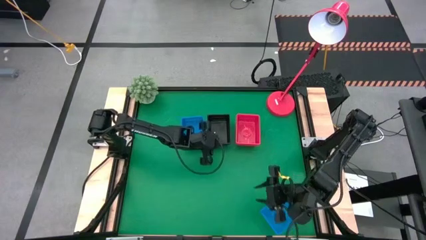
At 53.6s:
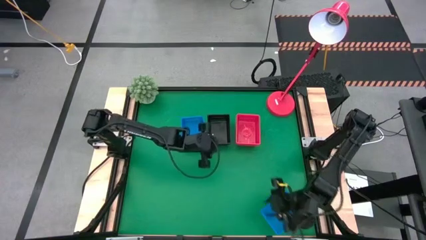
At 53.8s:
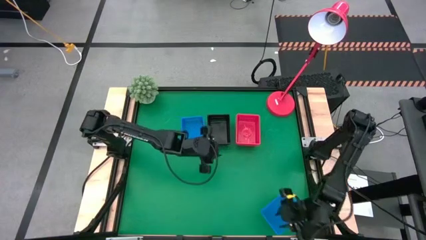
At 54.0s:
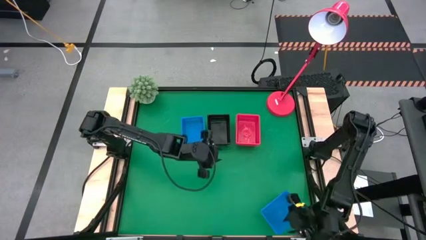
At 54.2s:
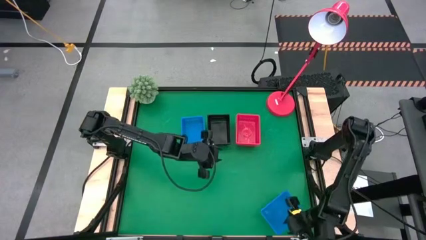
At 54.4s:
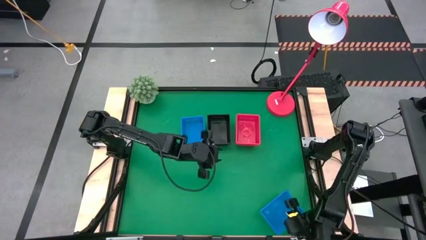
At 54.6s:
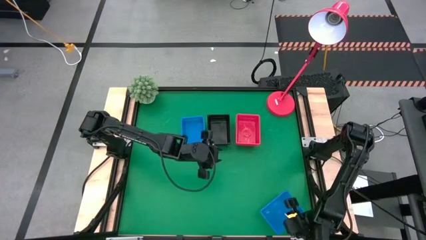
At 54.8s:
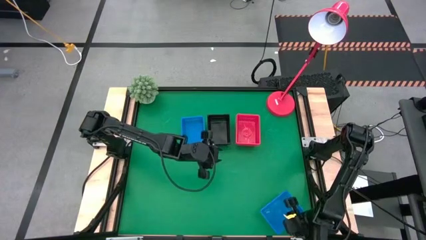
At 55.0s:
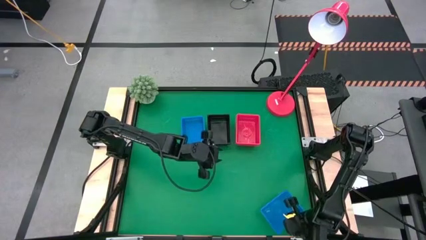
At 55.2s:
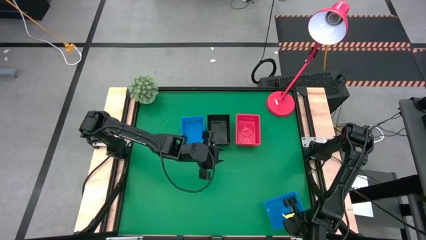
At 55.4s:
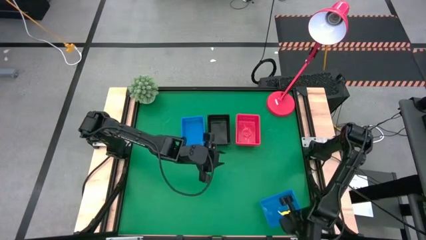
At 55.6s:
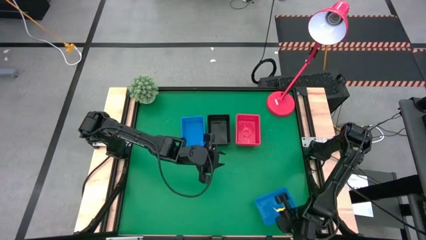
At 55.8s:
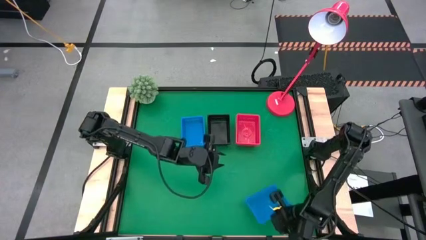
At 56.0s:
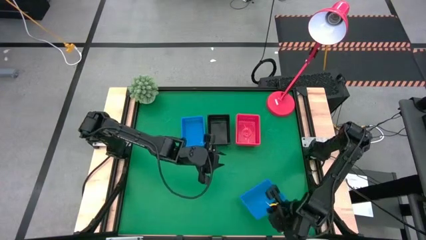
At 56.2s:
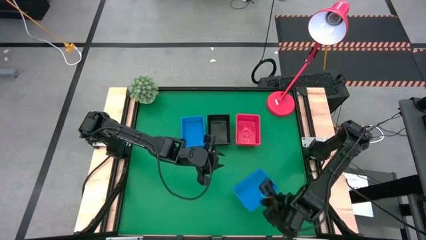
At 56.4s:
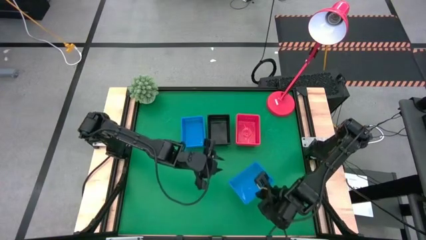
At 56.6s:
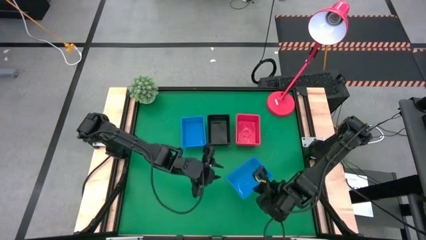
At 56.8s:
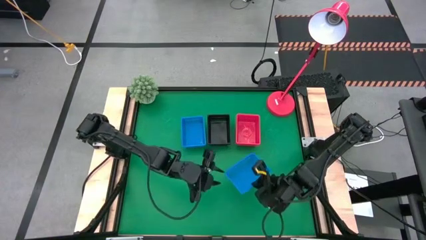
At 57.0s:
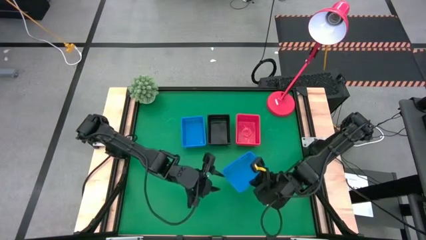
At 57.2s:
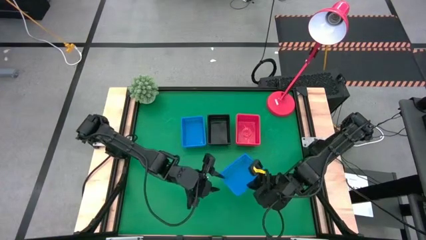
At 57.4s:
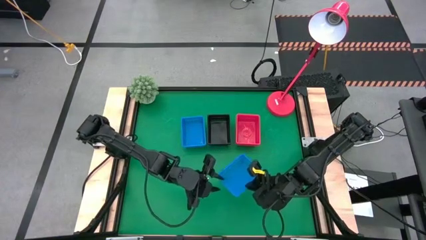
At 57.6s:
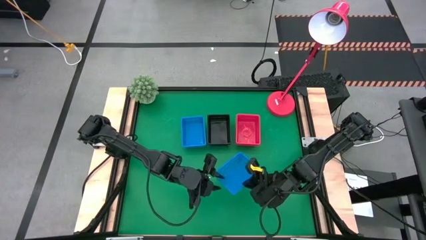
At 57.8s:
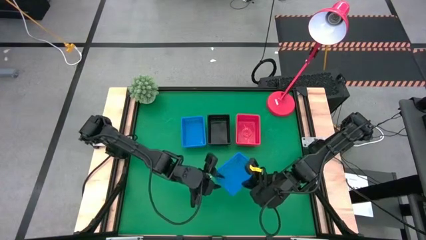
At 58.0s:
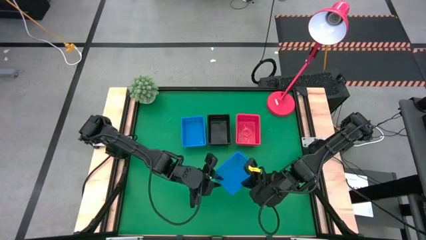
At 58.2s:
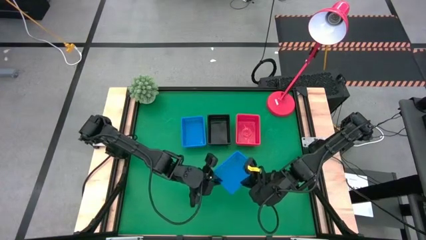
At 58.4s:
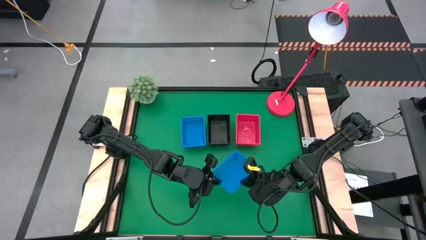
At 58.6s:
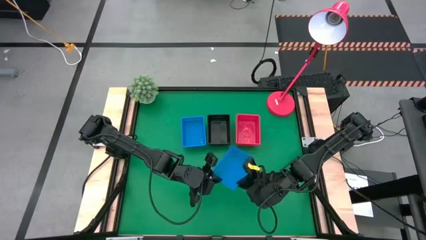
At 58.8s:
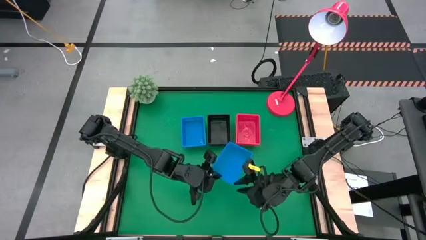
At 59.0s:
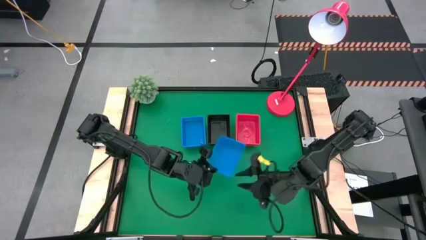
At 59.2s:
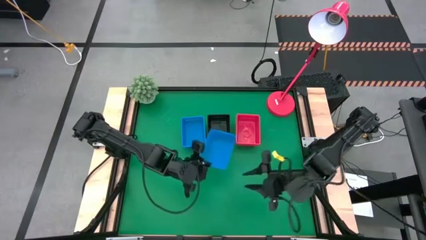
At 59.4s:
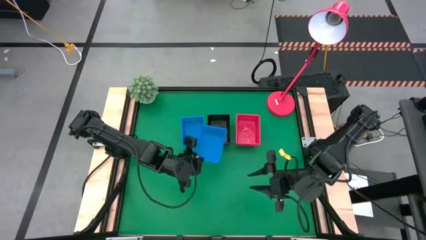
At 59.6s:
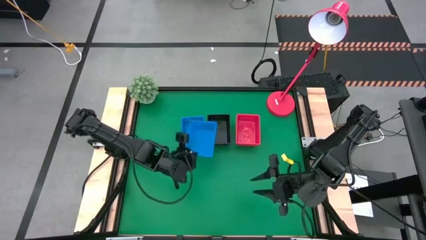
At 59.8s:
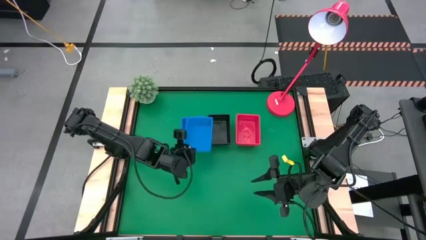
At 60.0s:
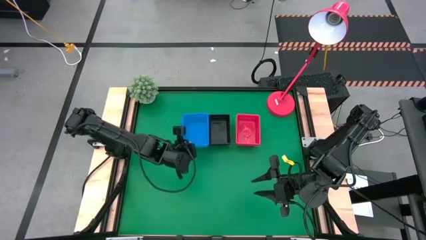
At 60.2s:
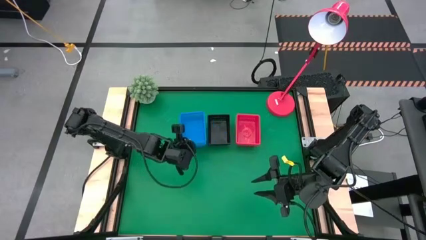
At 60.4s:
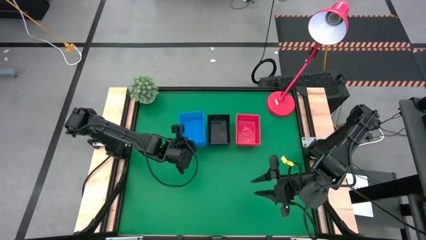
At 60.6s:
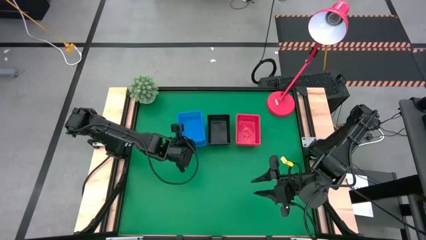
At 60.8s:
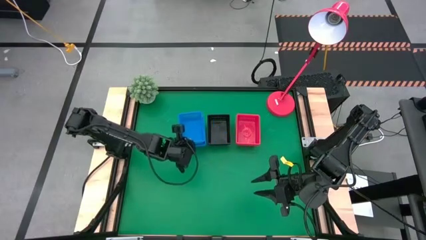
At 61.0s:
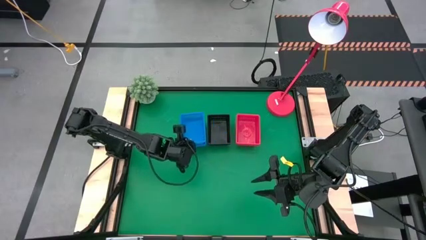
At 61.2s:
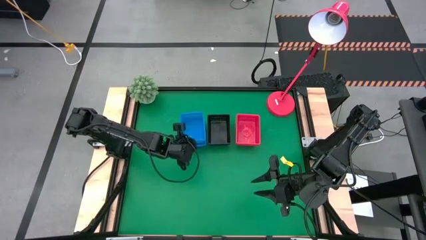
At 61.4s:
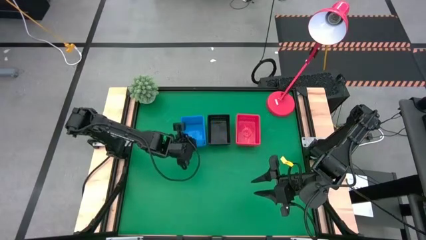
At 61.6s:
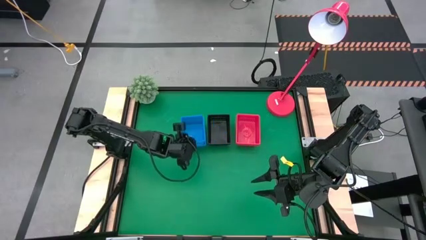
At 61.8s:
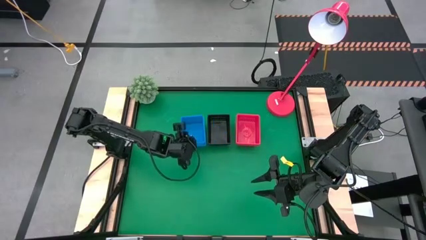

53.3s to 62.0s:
Stack the bottom blue bin on top of the top blue bin
